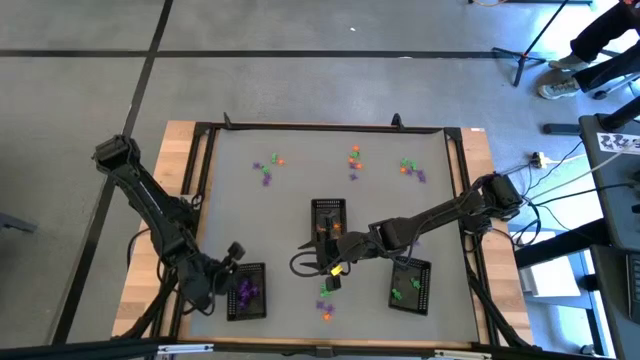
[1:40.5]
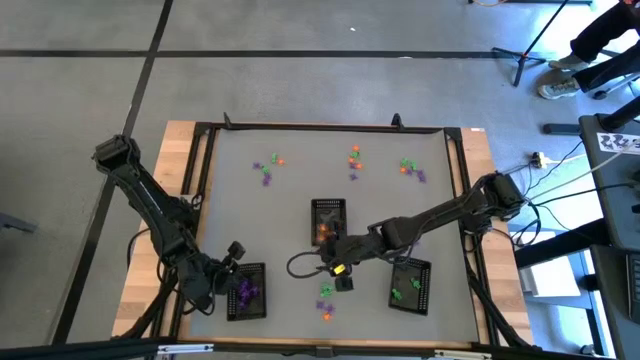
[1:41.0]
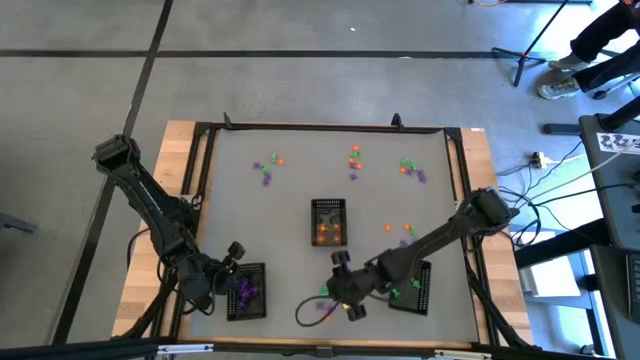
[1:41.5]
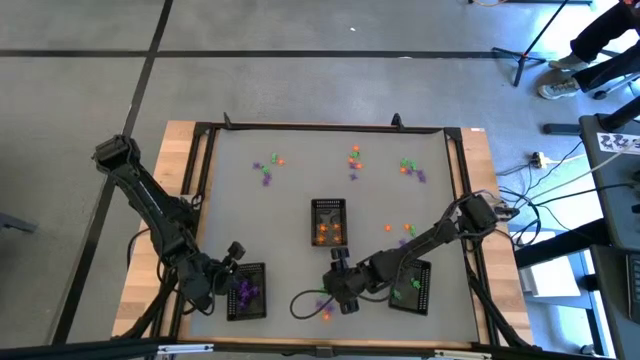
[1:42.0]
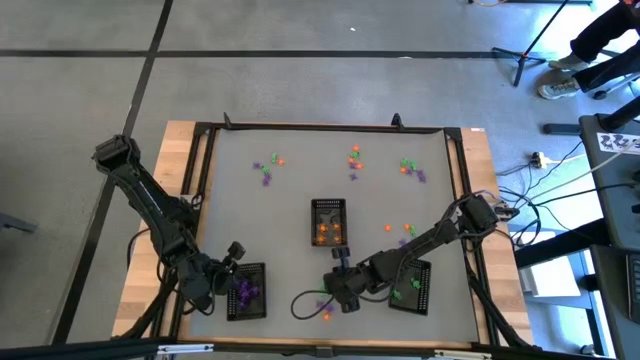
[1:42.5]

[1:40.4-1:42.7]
Task: Sort Halloween decoration
Put the green skeleton toy into the bottom right black bin

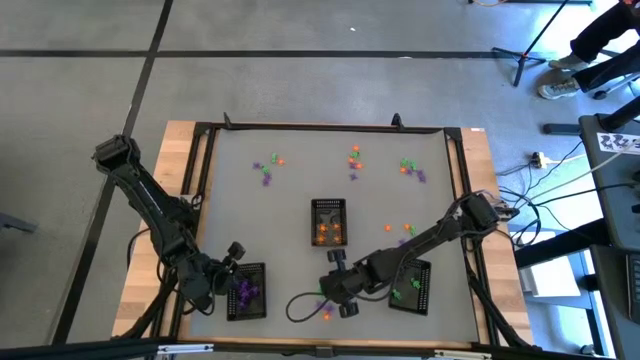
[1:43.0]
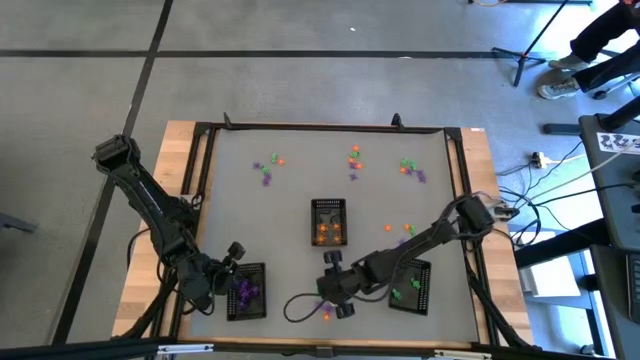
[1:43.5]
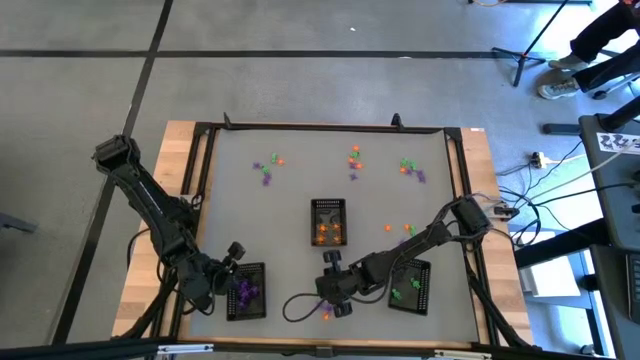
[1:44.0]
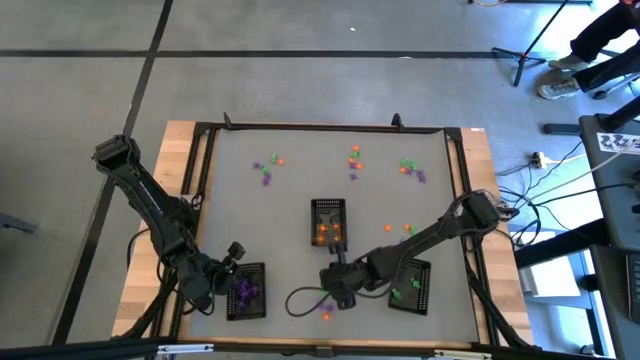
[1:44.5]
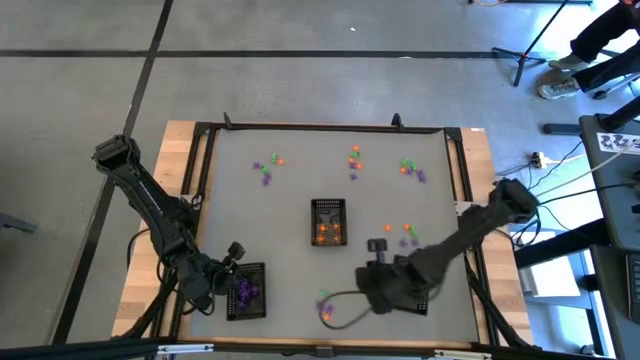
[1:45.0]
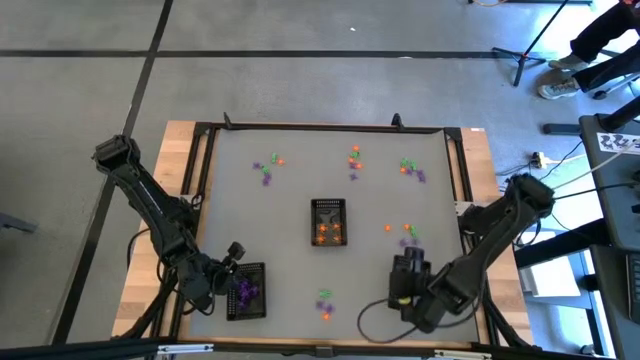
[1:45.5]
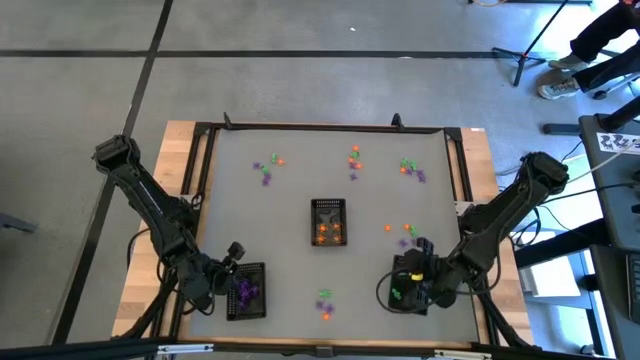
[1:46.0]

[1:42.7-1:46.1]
Put the green skeleton toy into the bottom right black bin

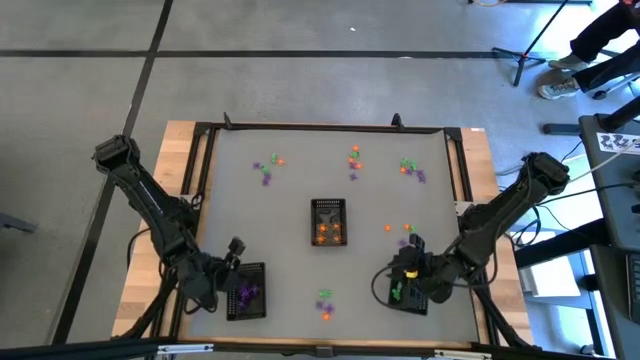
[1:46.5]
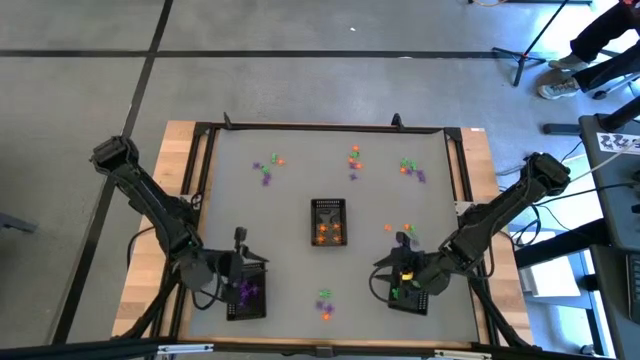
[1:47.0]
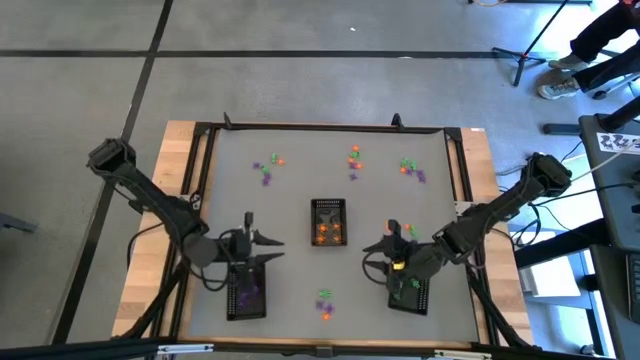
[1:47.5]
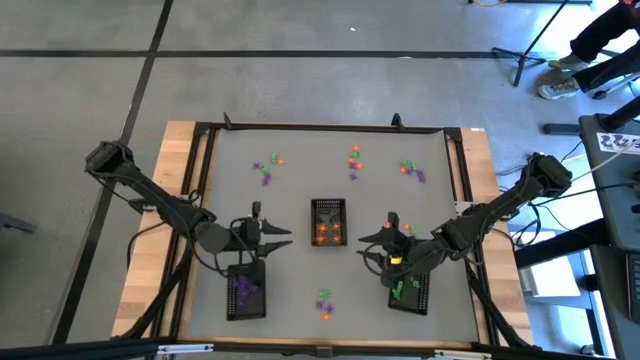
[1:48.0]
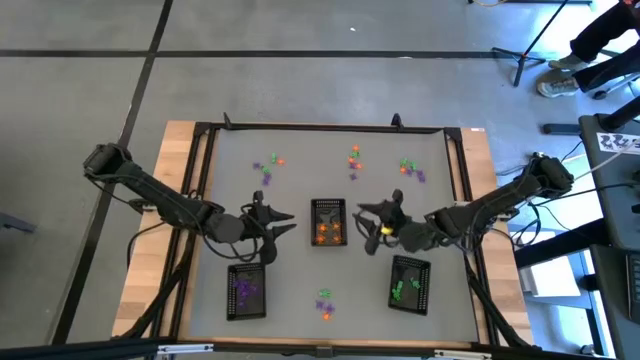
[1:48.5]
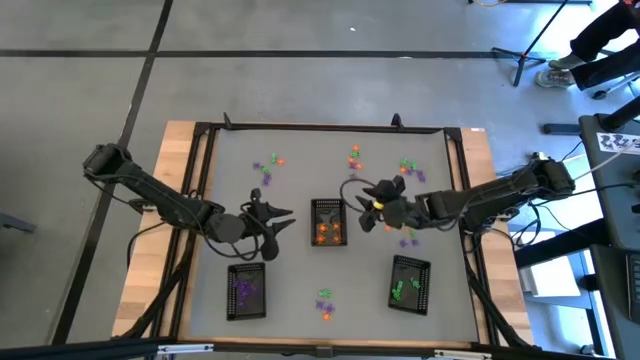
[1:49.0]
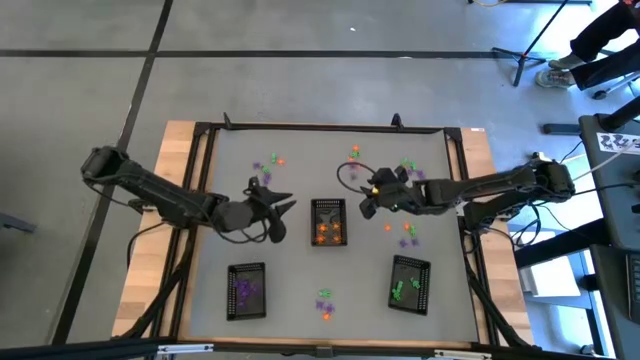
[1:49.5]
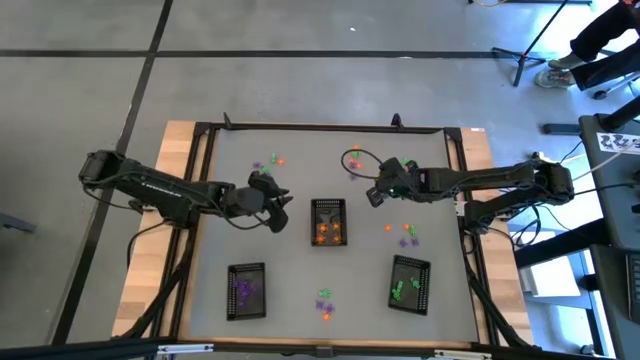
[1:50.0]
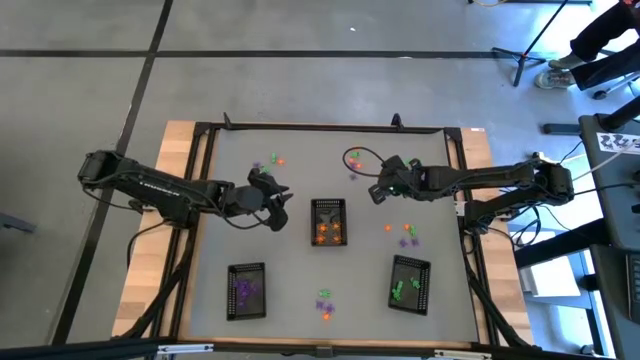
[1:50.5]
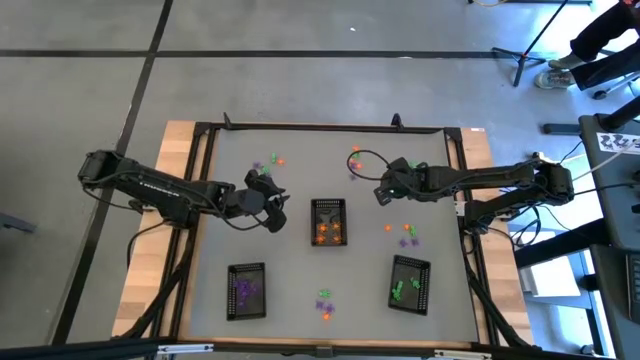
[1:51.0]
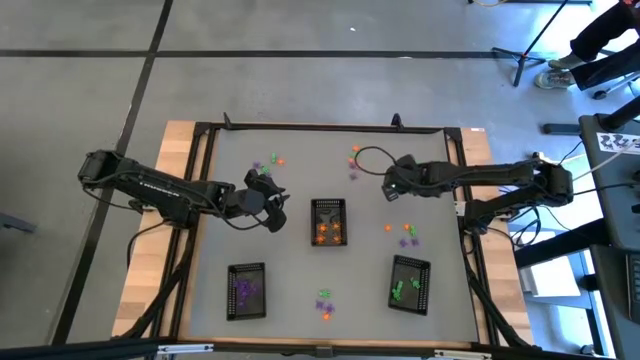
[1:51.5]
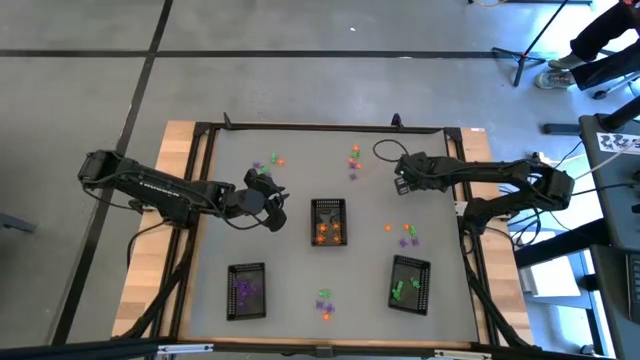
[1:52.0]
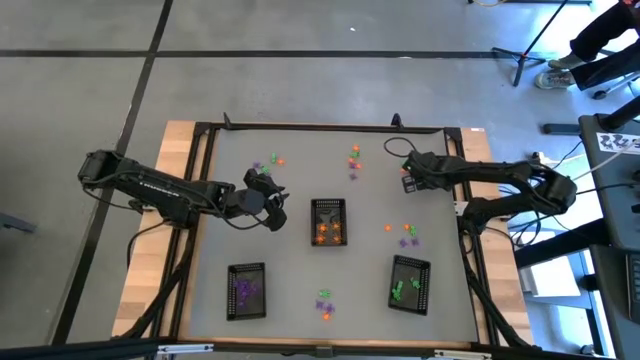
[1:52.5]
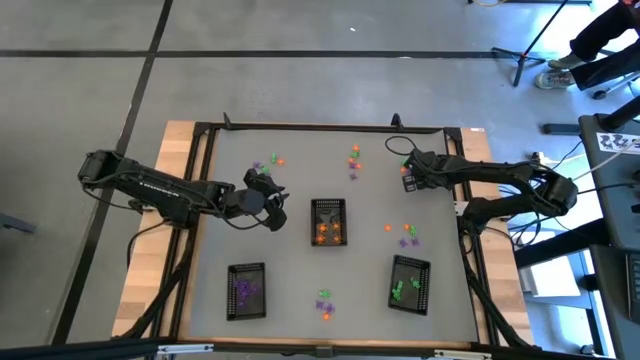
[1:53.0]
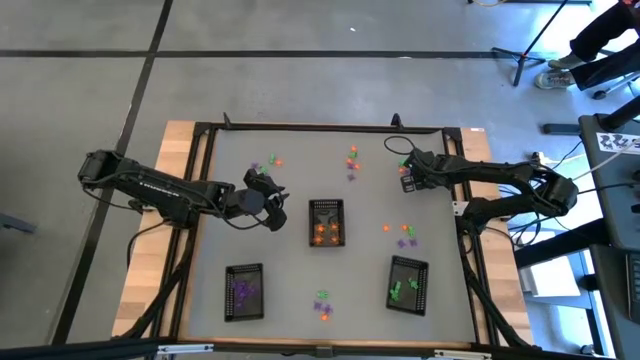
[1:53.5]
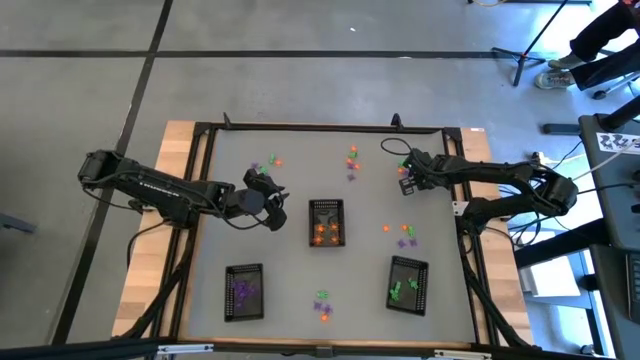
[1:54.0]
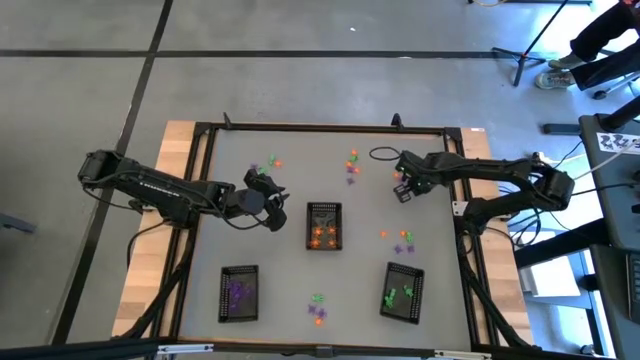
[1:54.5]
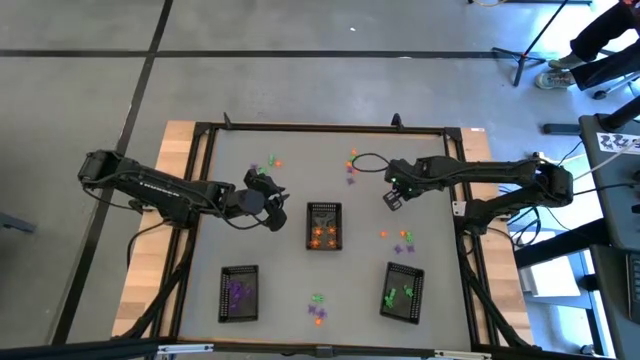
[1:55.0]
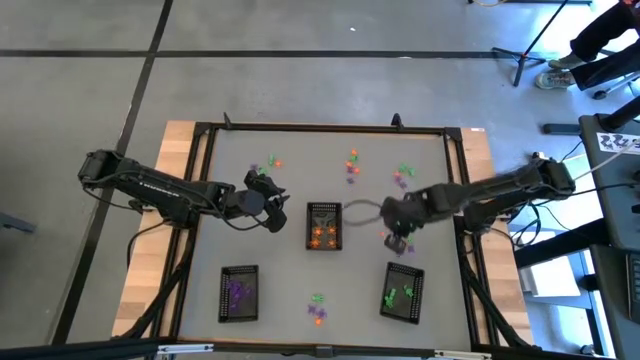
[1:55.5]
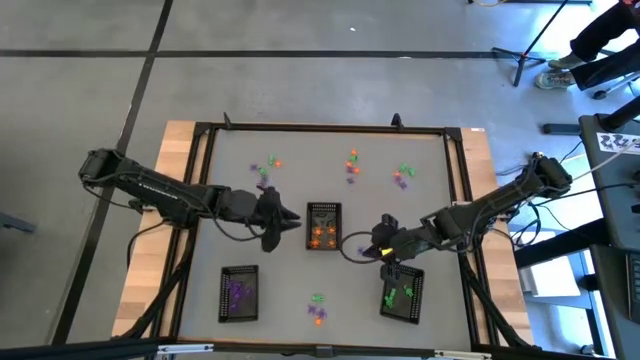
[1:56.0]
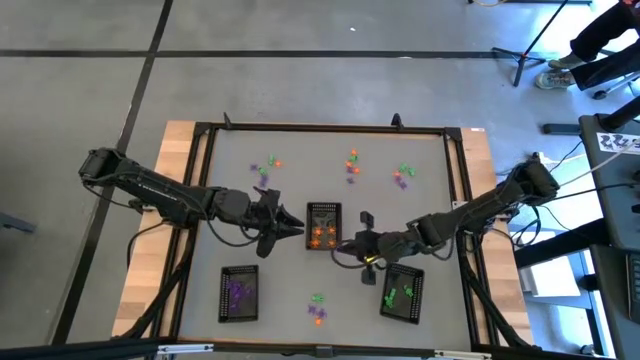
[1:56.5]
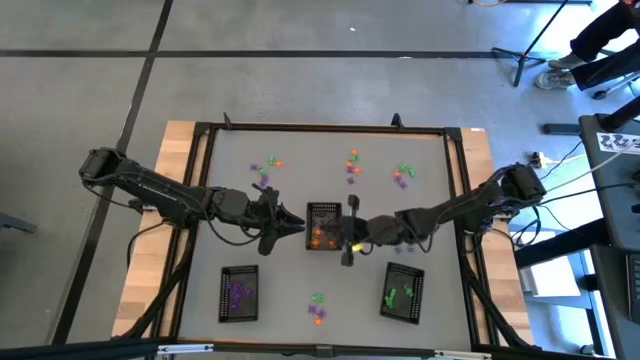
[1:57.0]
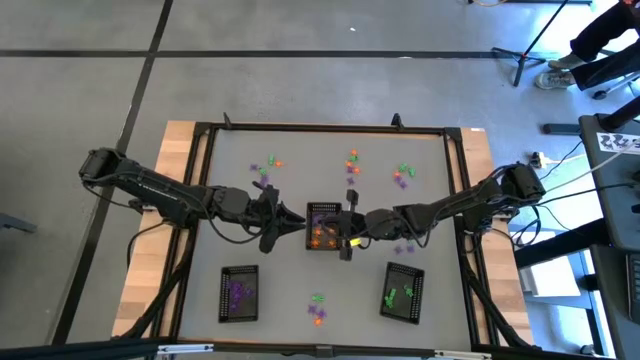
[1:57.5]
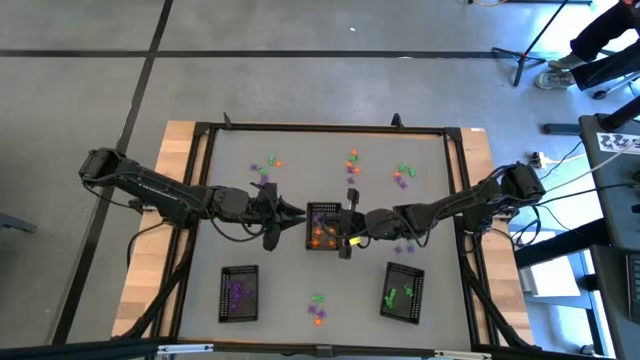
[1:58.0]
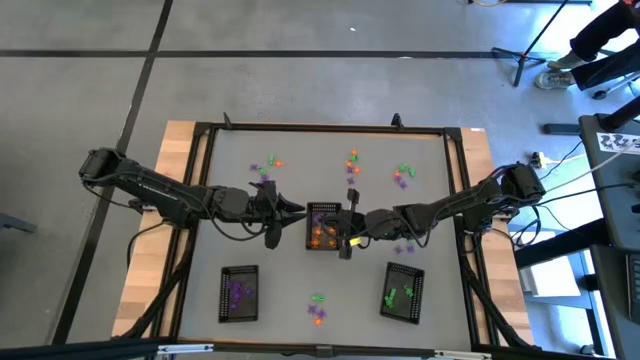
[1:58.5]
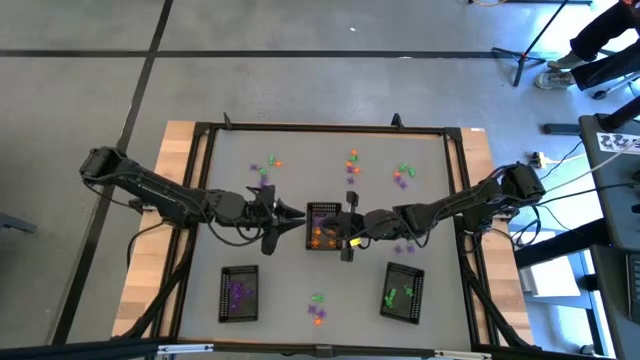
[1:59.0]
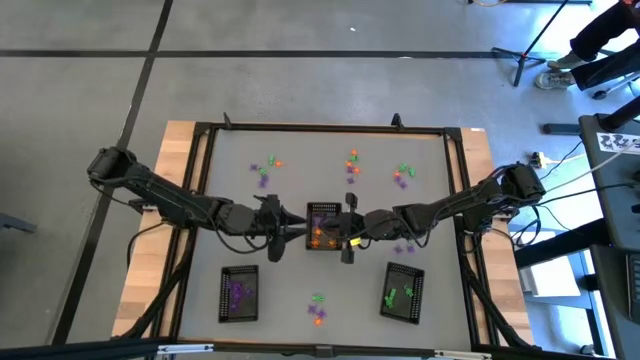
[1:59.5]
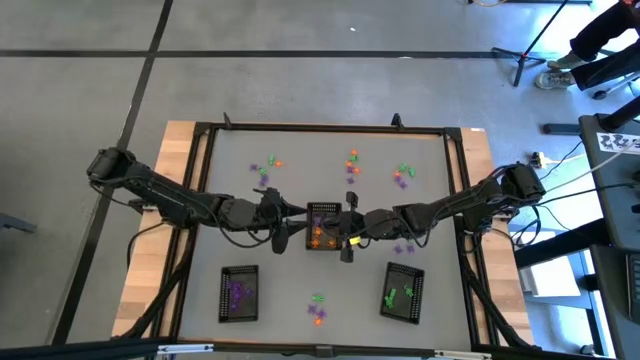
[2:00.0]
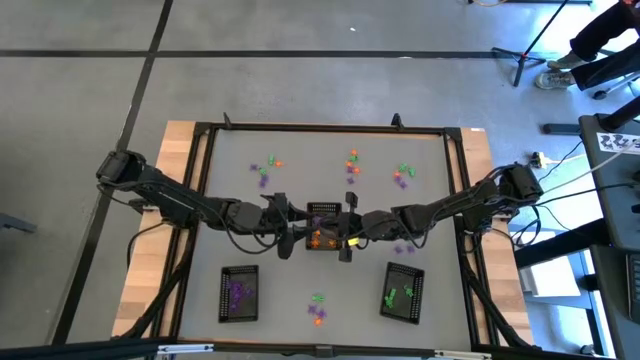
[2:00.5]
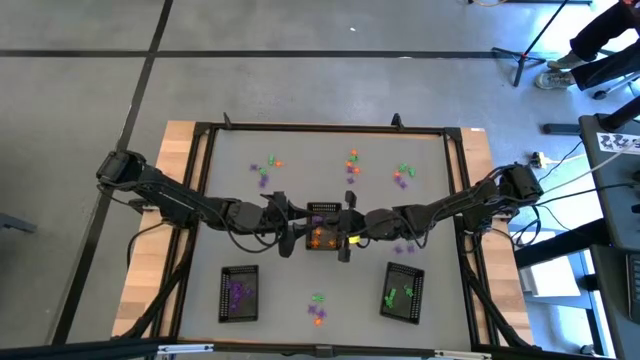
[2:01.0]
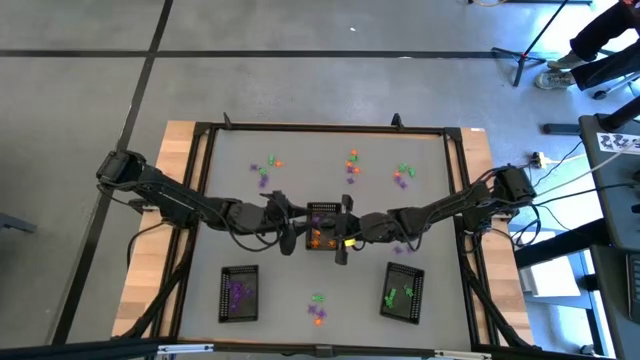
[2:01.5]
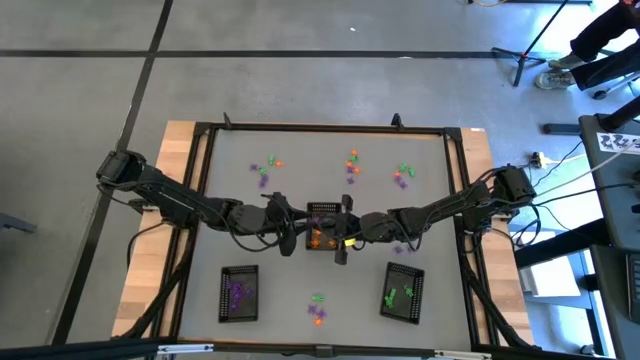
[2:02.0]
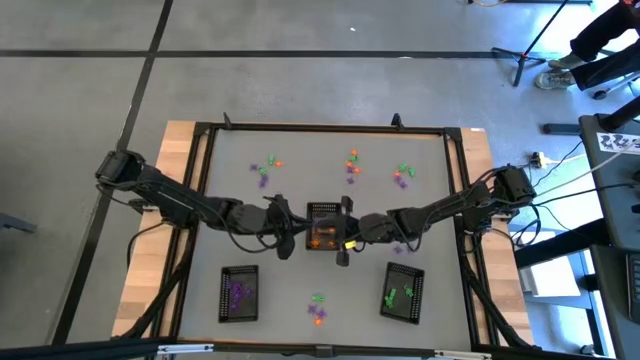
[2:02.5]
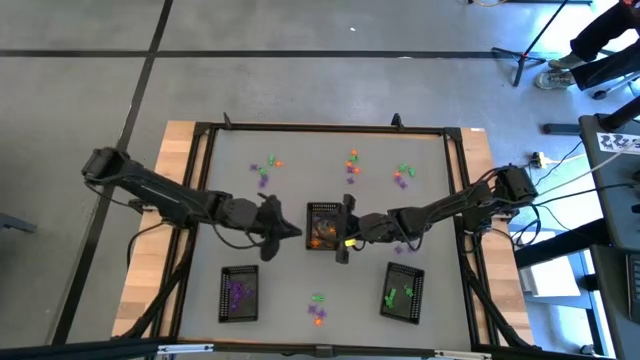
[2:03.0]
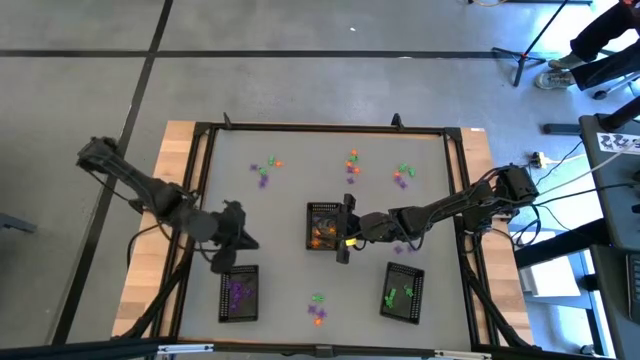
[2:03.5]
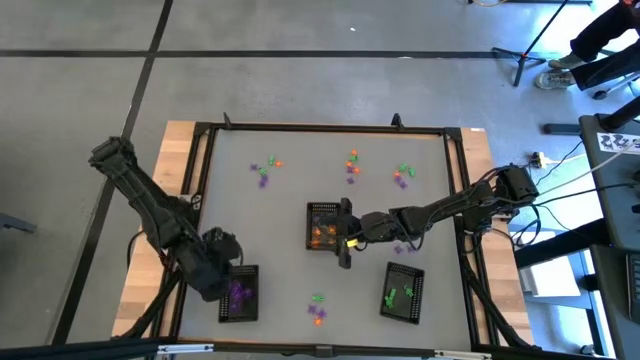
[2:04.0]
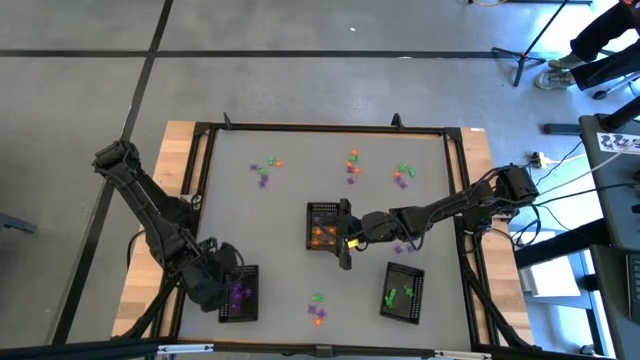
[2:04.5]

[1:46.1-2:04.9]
Put the violet spider toy into the bottom left black bin
